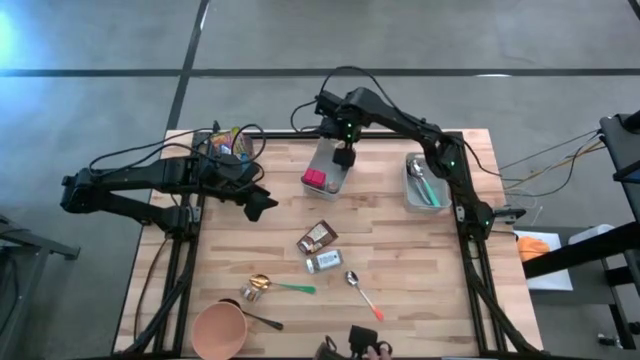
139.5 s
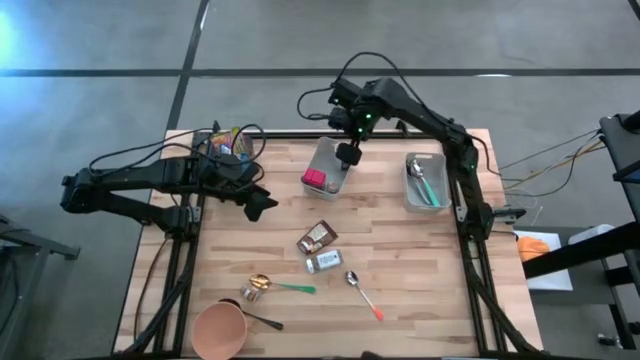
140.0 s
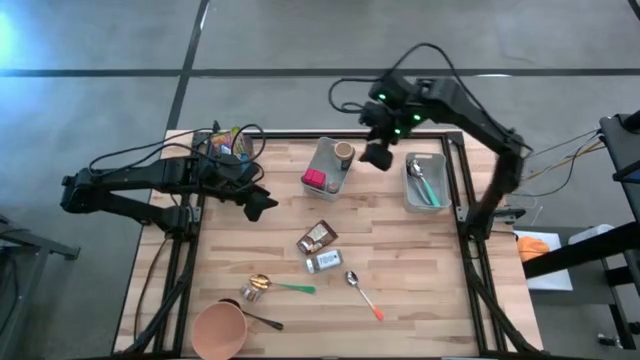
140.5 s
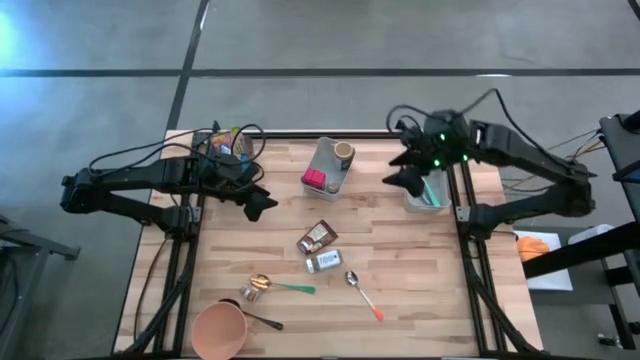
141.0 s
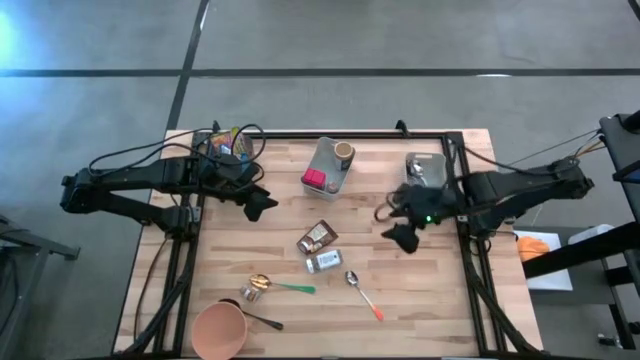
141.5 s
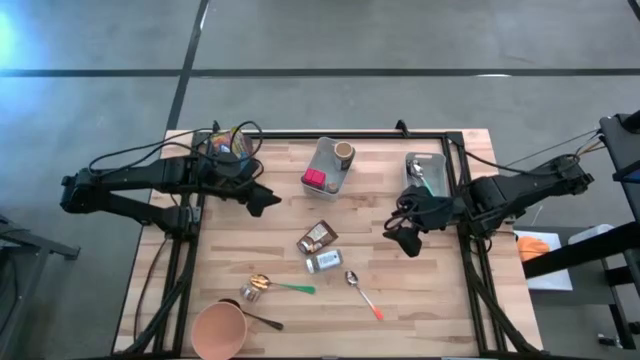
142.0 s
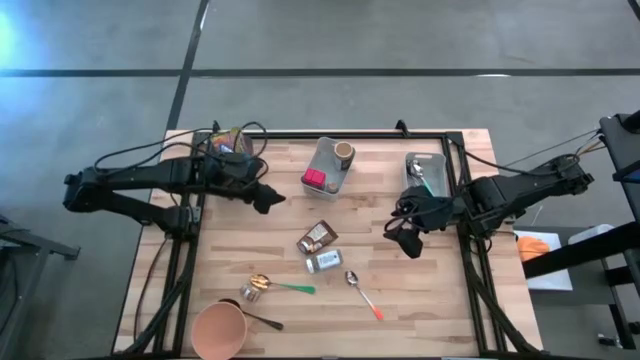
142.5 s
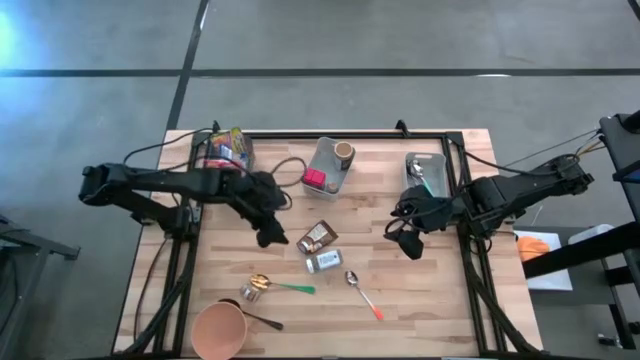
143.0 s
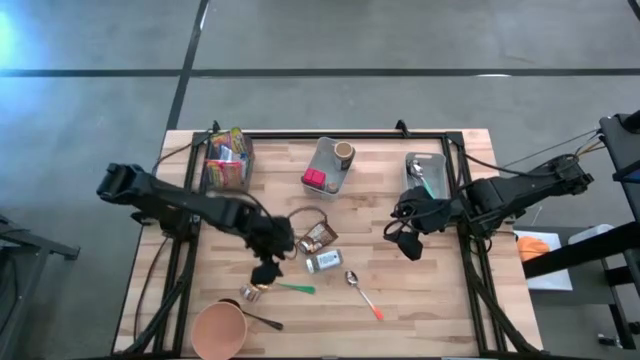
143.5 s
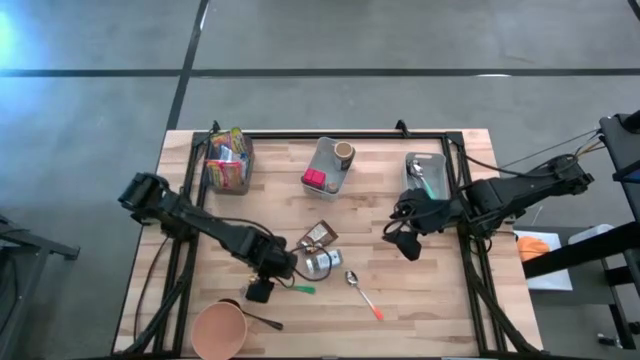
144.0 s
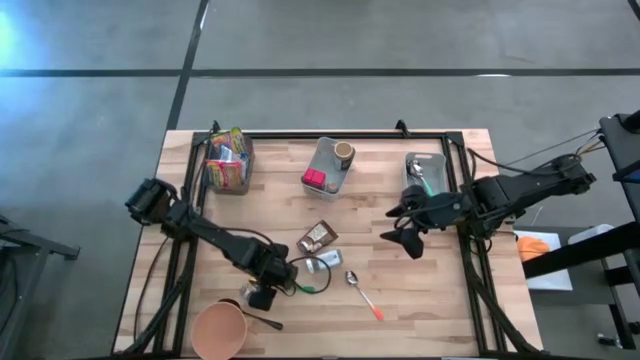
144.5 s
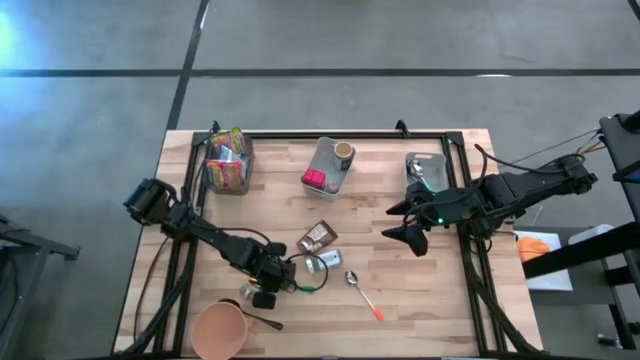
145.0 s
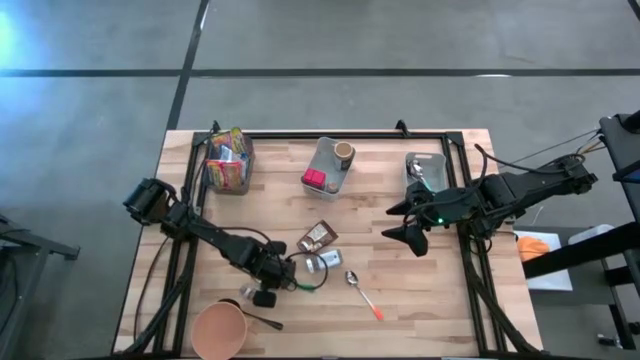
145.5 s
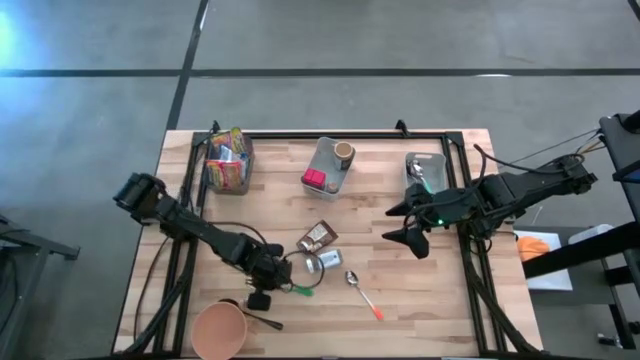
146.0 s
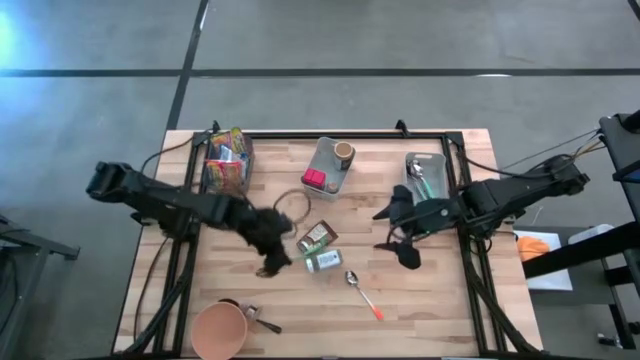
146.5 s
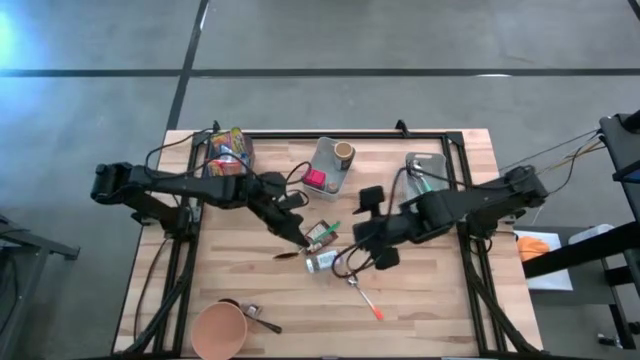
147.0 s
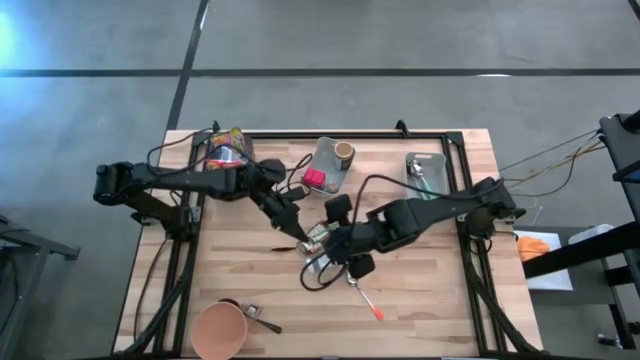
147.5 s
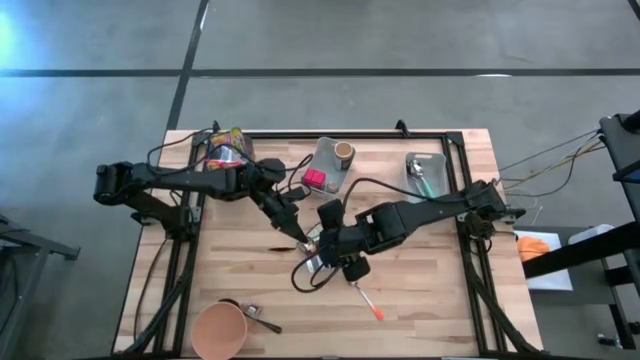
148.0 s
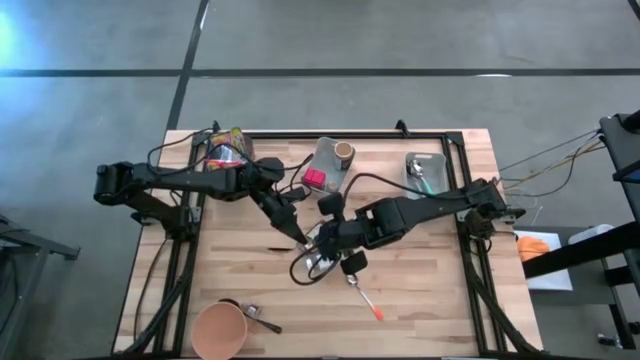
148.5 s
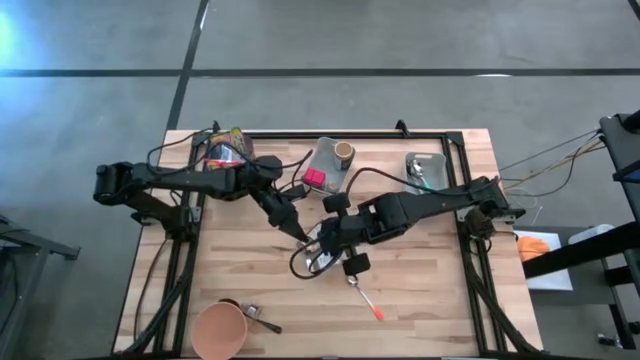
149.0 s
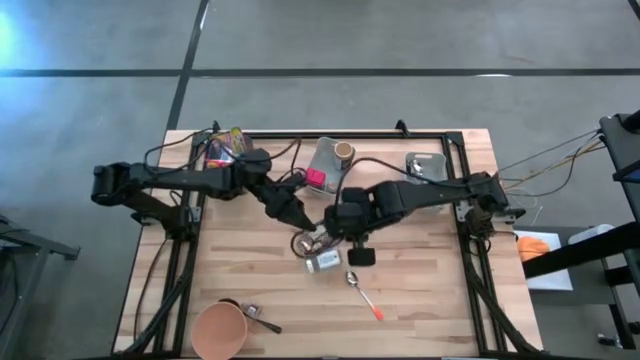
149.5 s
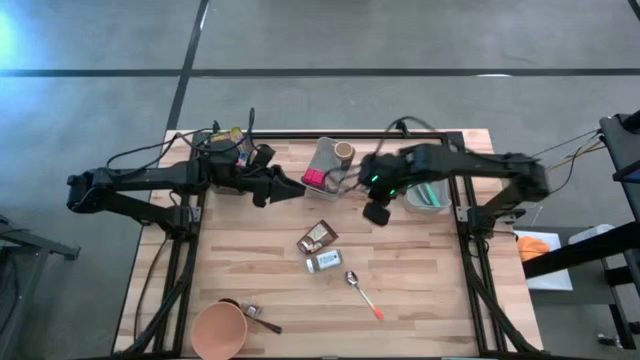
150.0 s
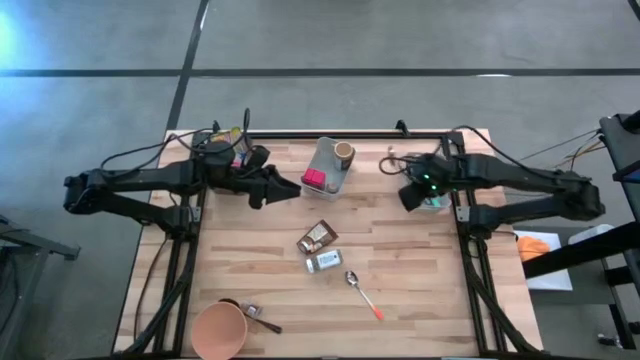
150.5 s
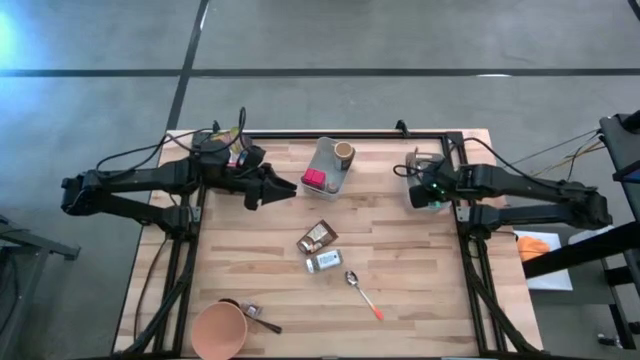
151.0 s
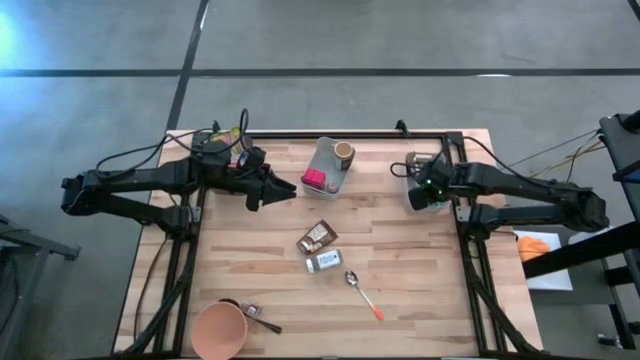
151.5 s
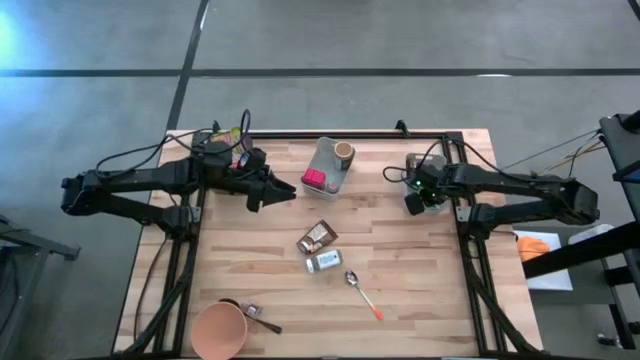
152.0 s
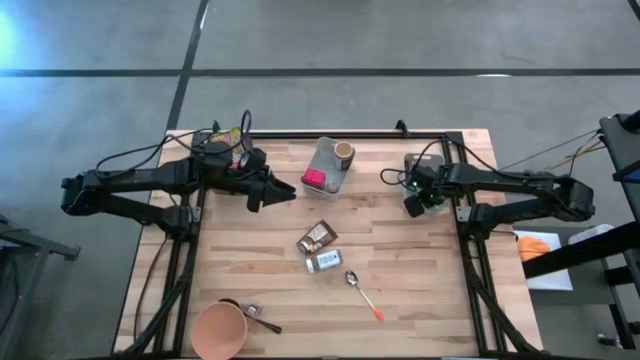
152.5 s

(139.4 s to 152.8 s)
Put the green spoon into the right gray bin

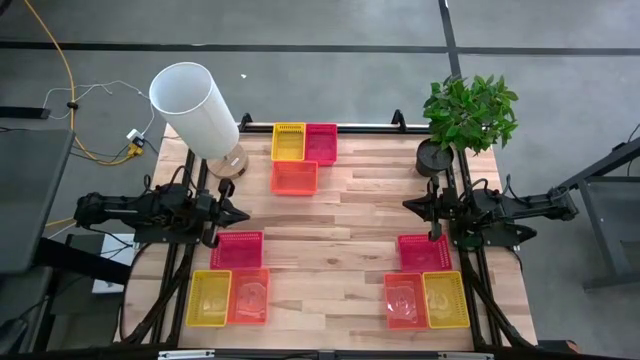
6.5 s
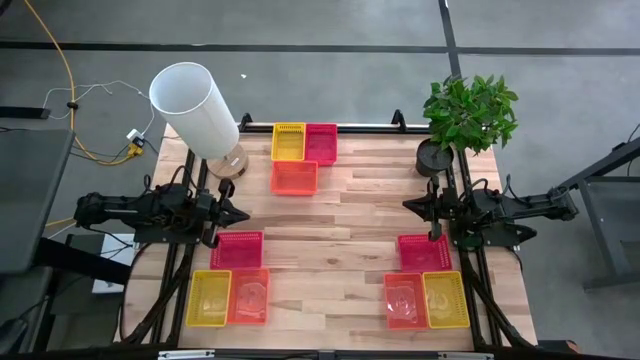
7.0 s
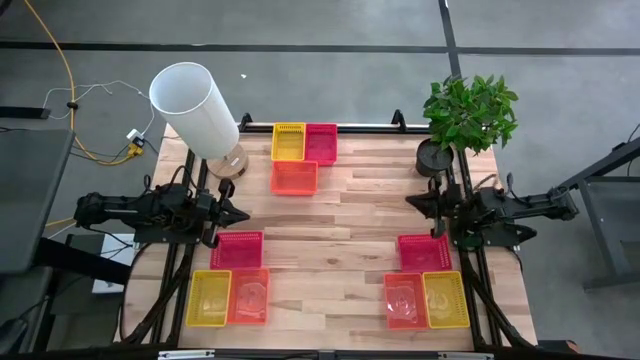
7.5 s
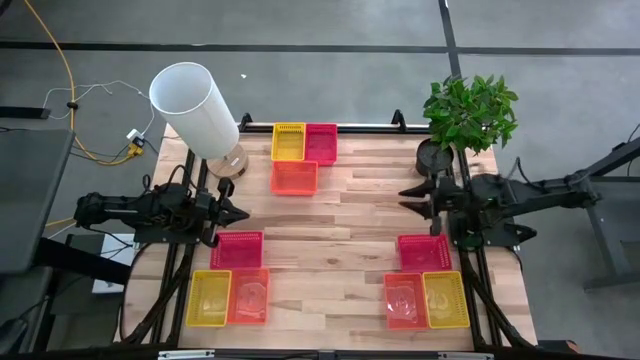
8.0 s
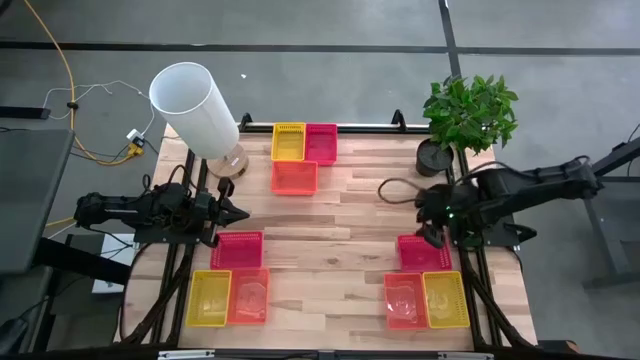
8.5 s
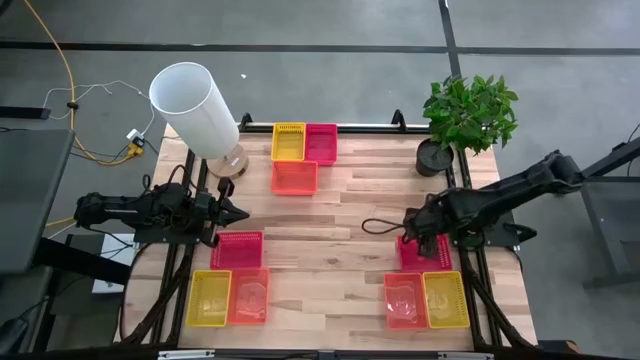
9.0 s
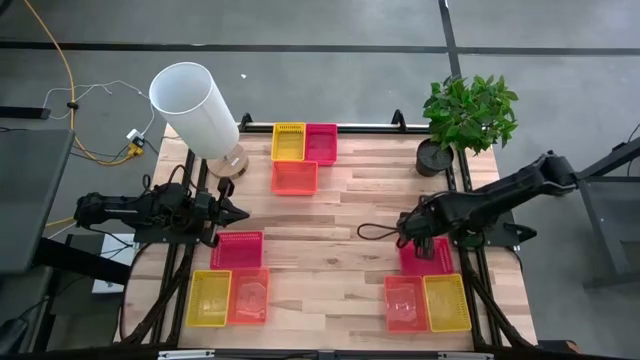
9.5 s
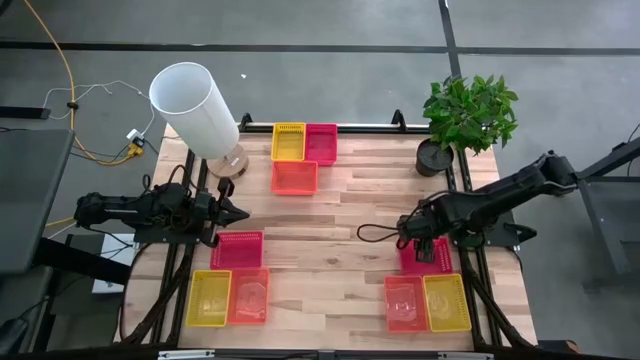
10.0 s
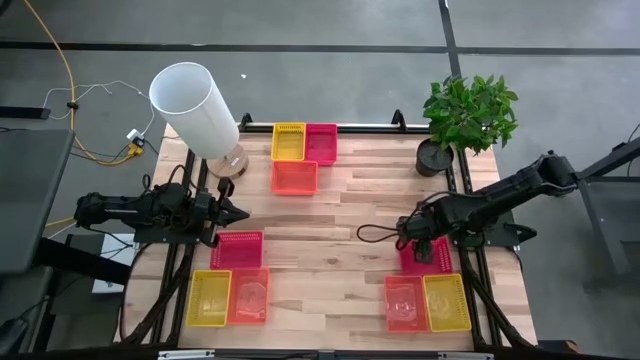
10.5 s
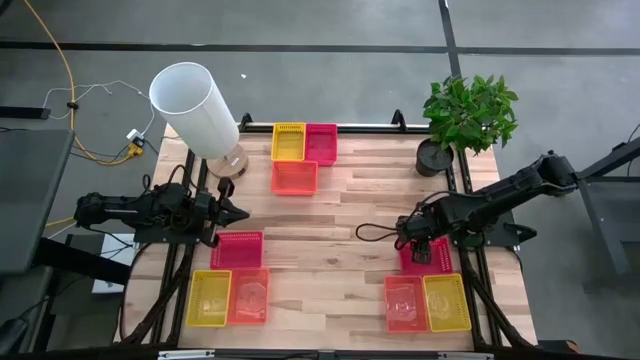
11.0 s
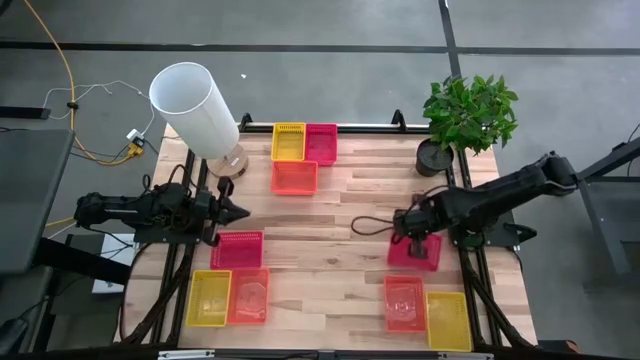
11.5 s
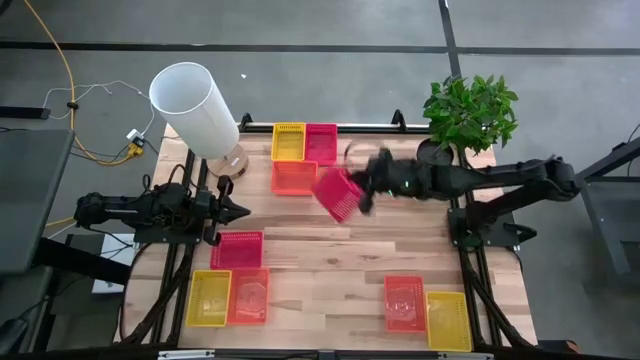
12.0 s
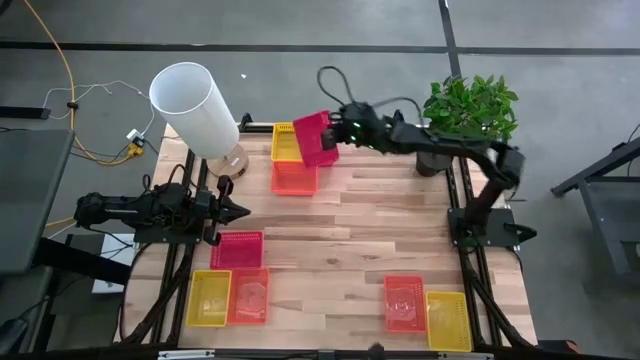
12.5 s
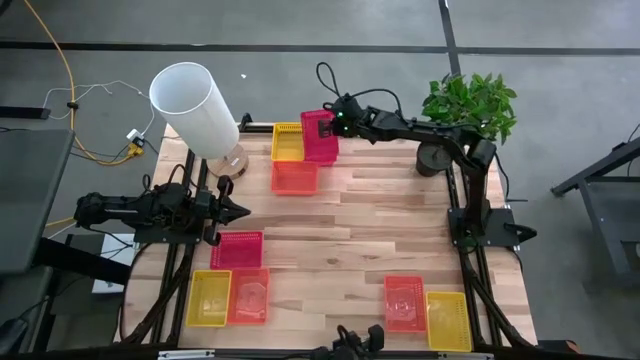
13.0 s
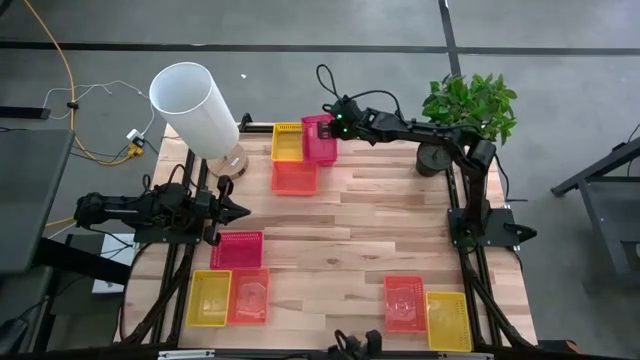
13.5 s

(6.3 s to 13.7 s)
Stack the bottom right red bin on top of the top red bin
